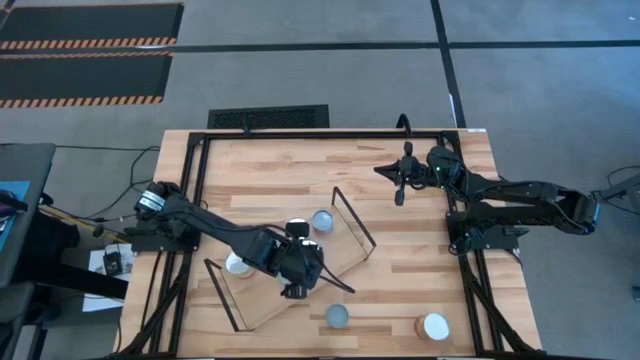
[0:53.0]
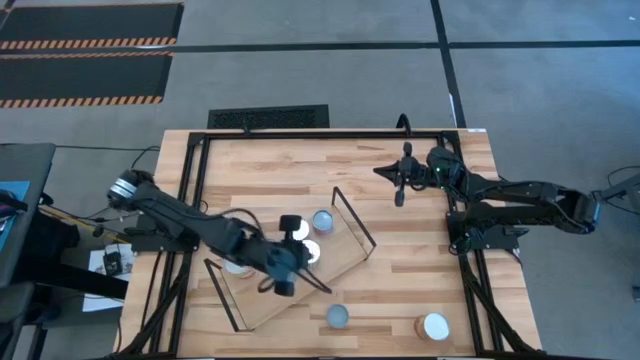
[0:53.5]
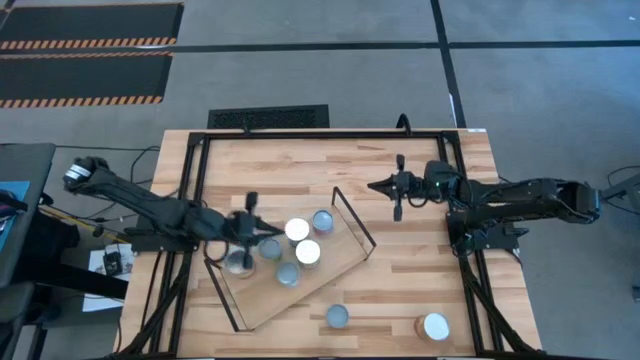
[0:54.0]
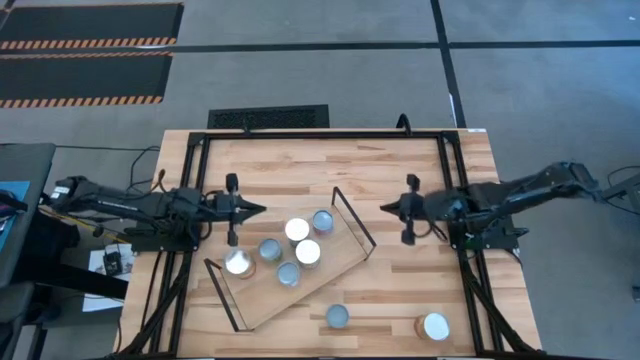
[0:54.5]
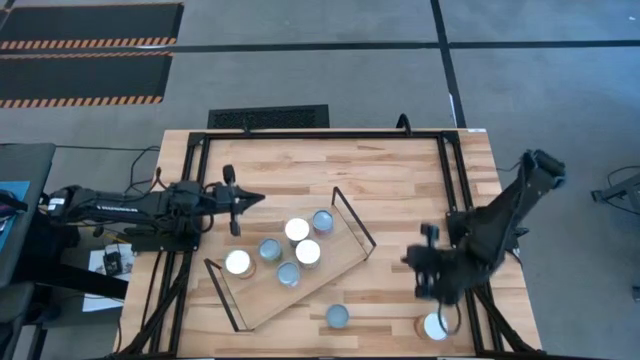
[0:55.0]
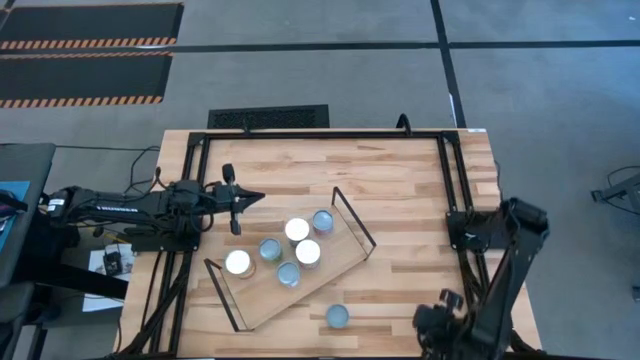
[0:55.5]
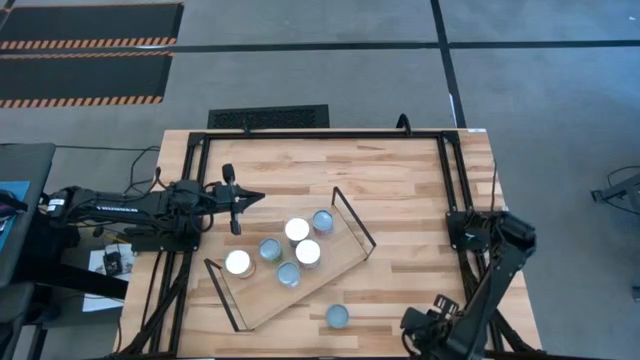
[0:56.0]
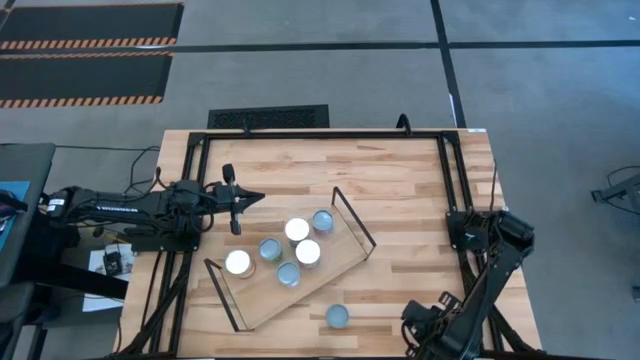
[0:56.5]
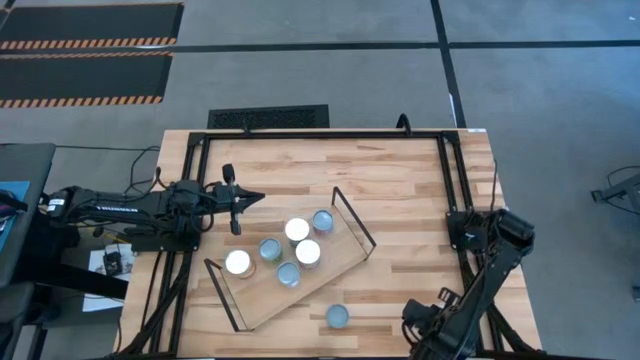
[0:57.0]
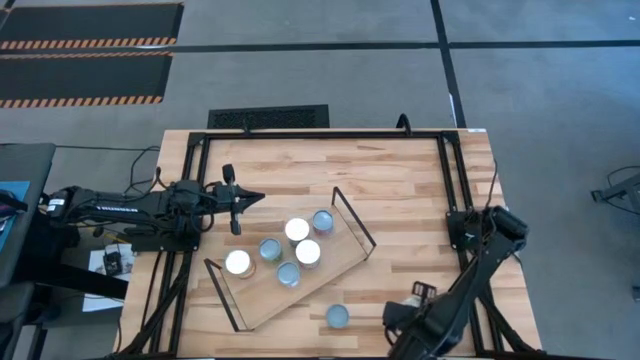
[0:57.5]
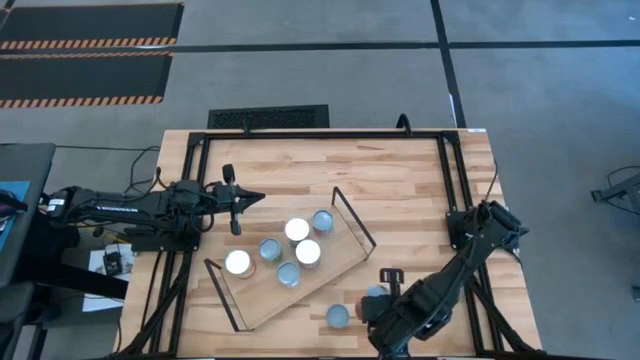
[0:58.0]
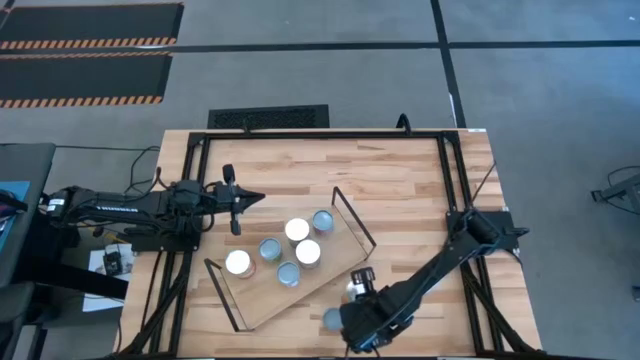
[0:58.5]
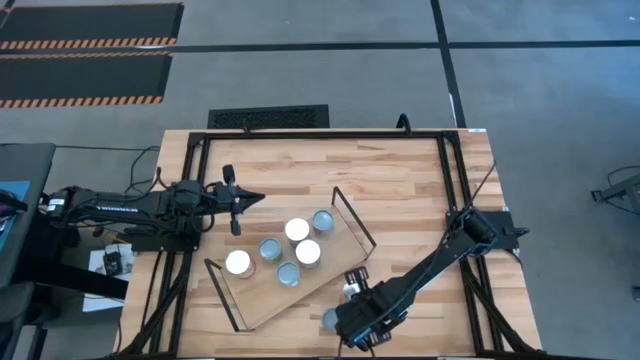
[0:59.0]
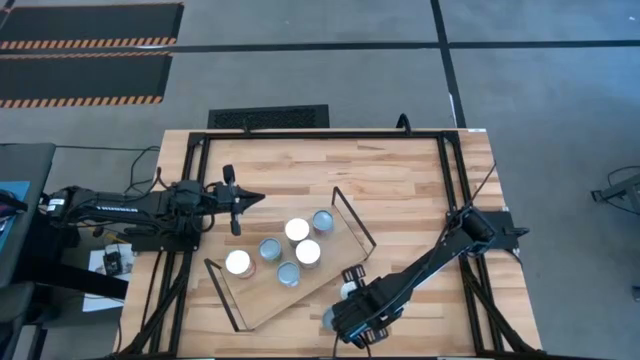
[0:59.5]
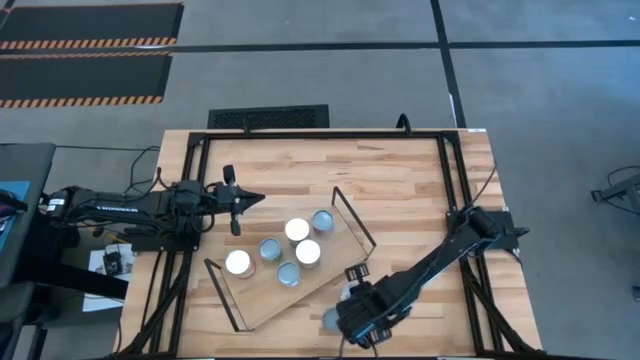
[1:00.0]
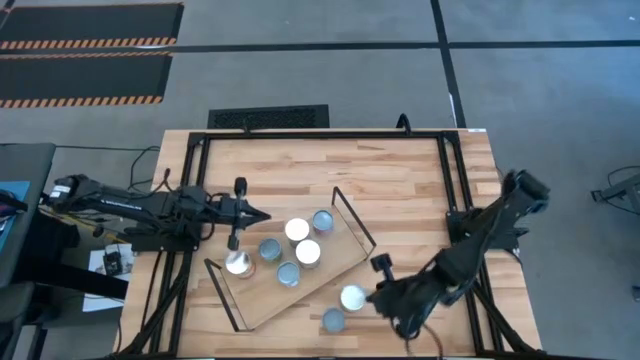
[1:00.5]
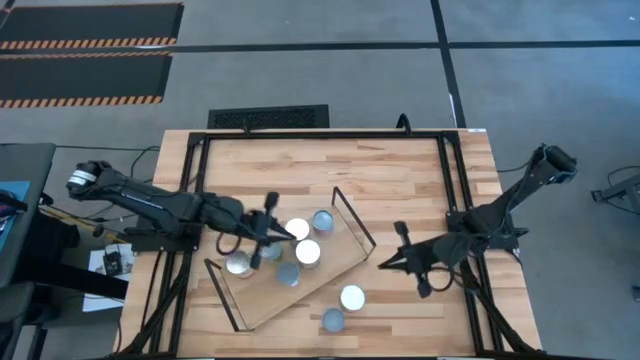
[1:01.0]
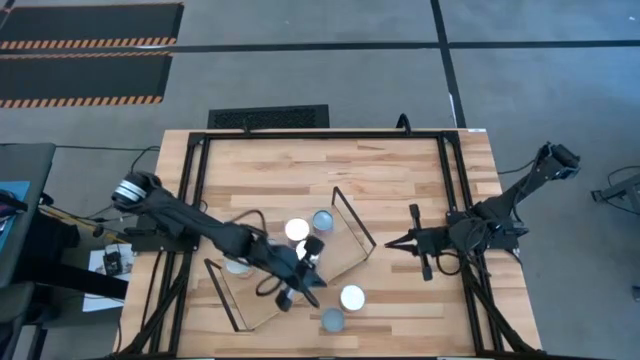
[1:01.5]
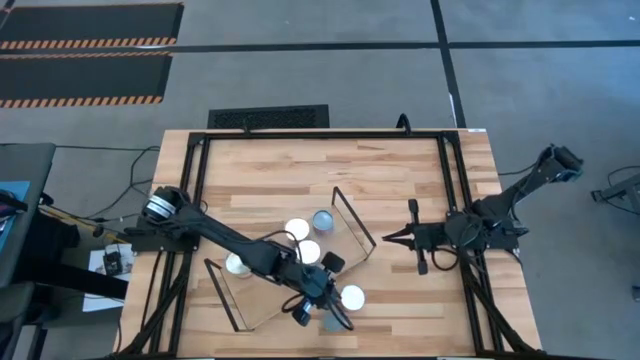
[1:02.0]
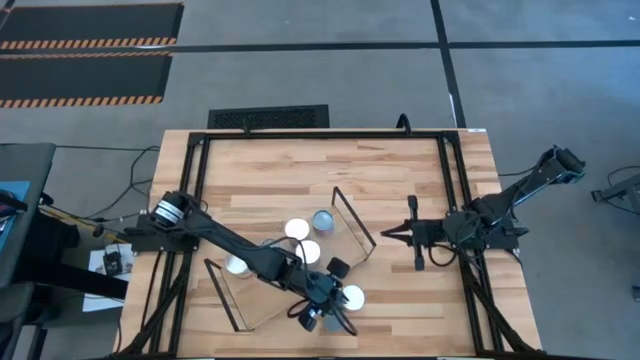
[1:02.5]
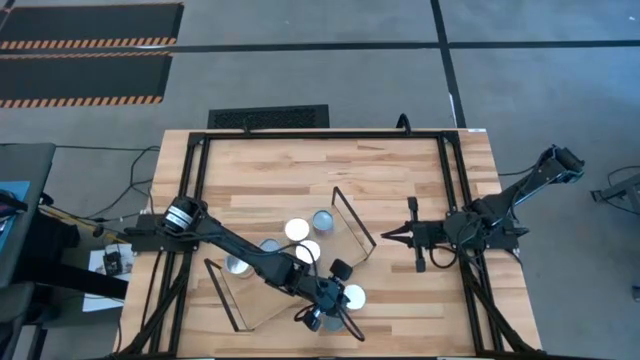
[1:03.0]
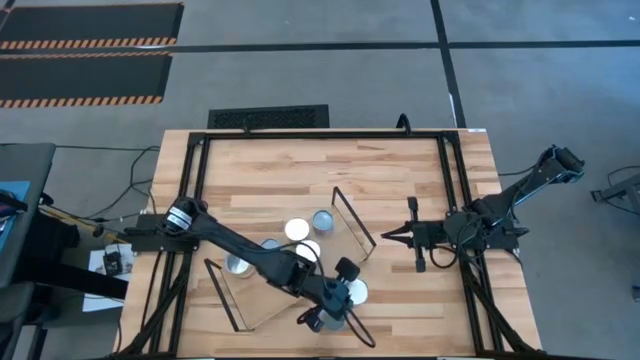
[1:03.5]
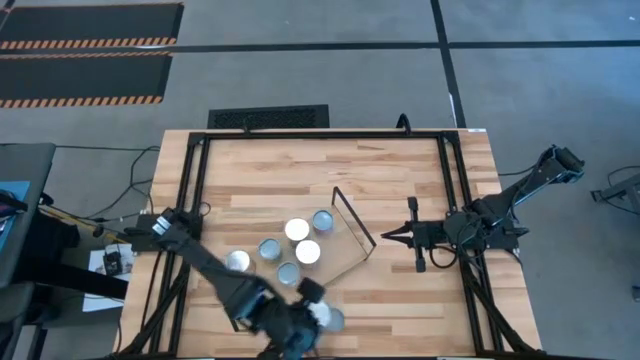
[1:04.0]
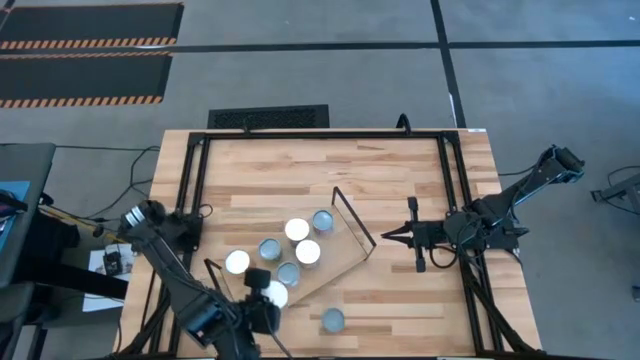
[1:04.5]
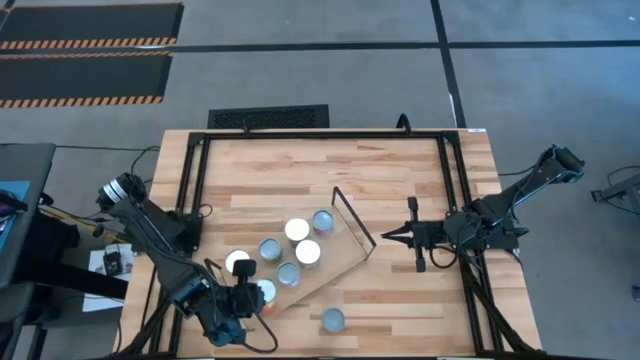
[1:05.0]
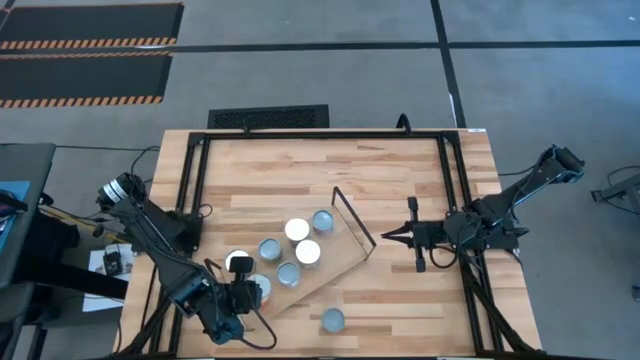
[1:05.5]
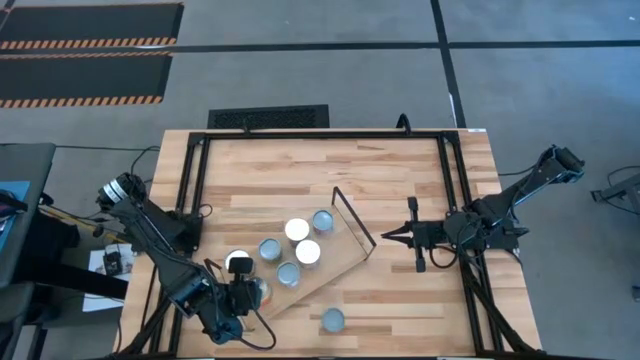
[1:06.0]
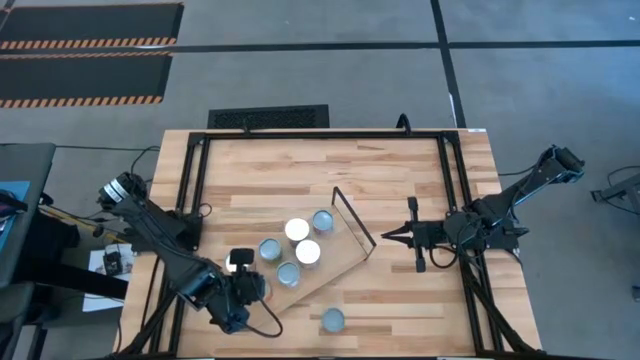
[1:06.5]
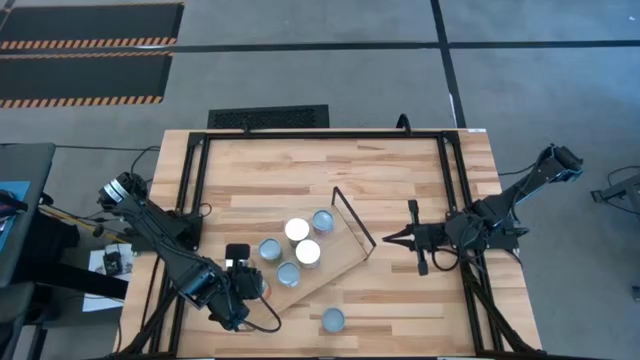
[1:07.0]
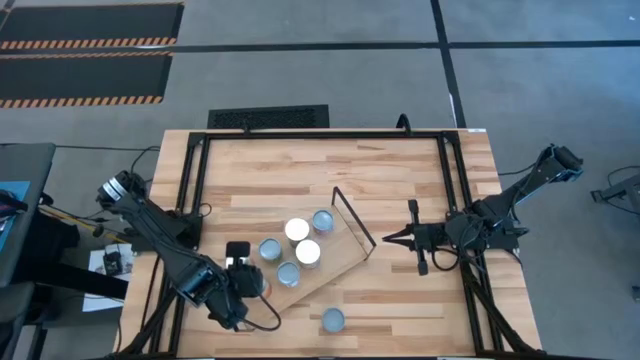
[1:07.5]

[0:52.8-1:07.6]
Task: Pick and place cans onto a shelf
Put the canned corn on the shelf

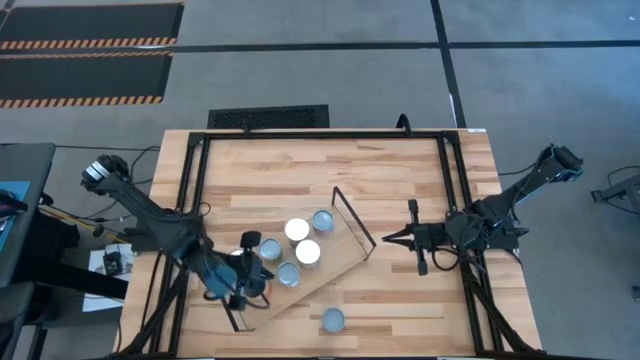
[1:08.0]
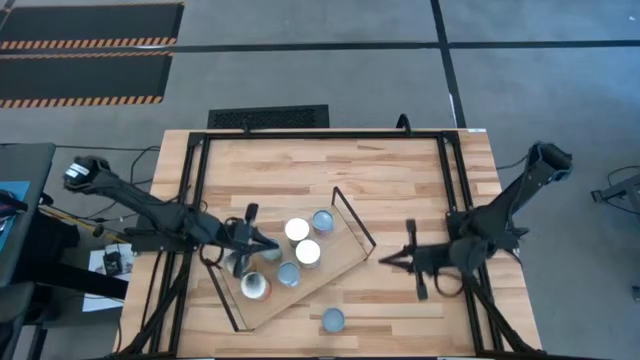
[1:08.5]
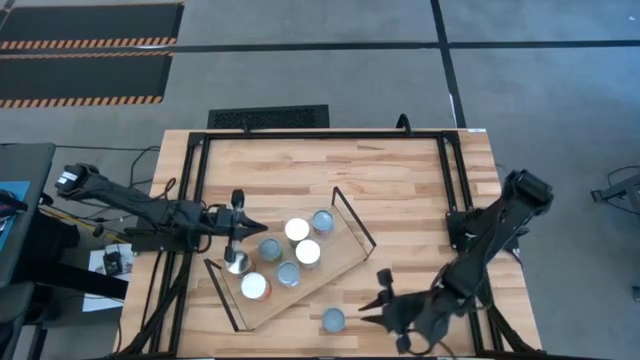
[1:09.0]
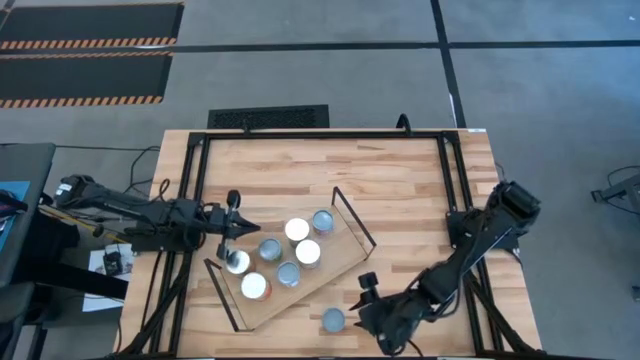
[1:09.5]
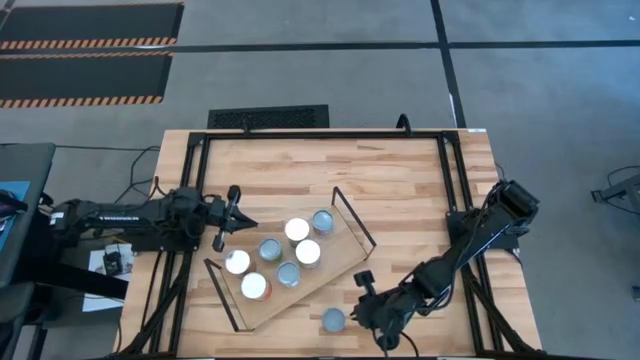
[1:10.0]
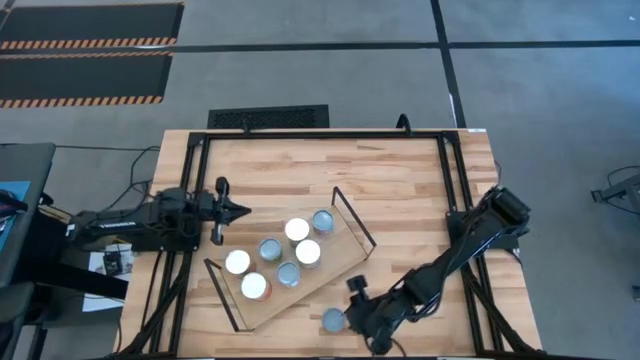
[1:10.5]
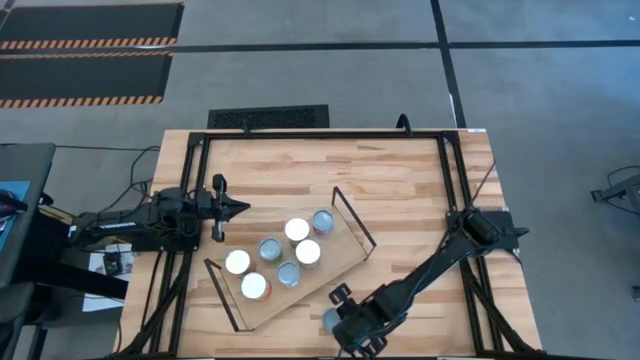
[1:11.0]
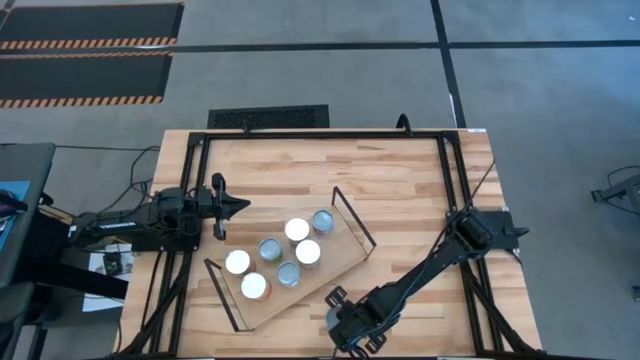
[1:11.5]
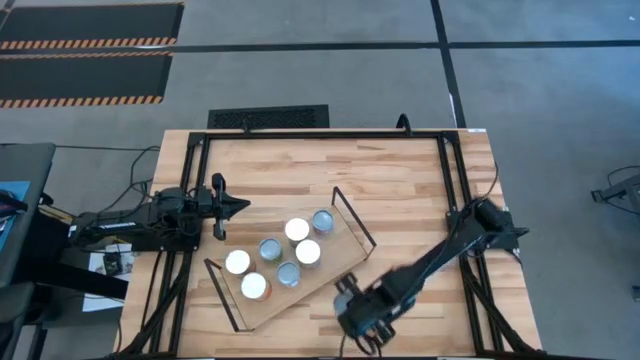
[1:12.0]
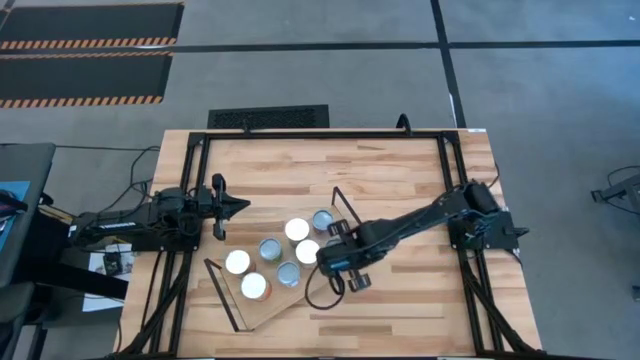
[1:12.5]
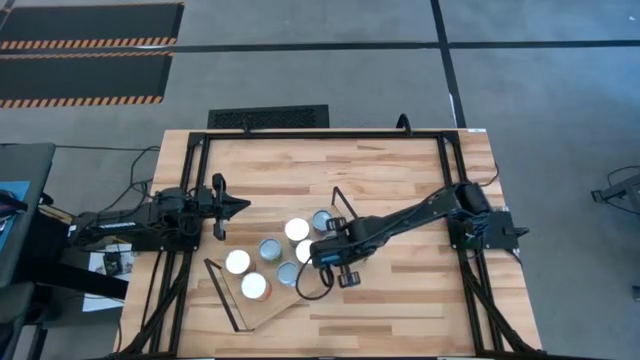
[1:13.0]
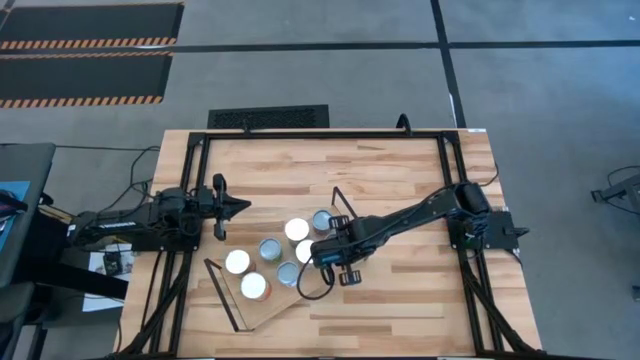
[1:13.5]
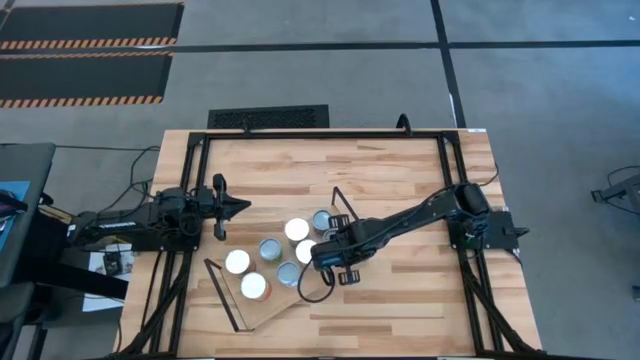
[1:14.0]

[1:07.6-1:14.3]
Put the canned orange on the shelf
